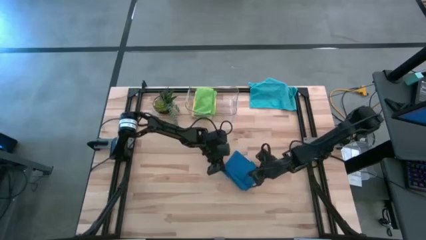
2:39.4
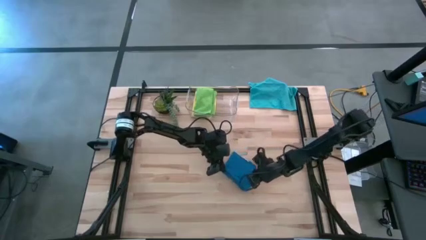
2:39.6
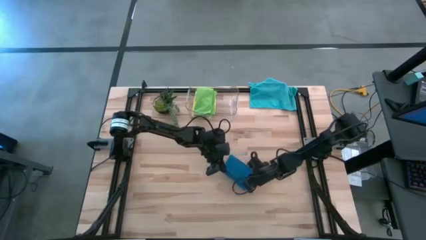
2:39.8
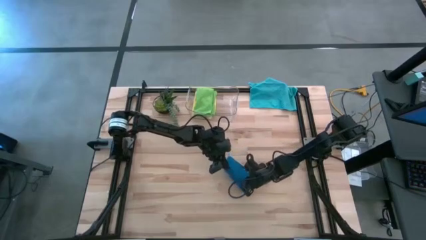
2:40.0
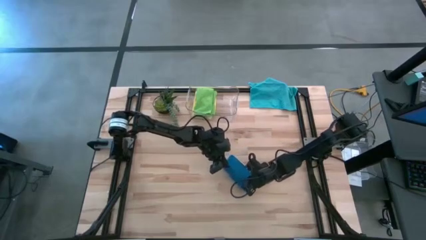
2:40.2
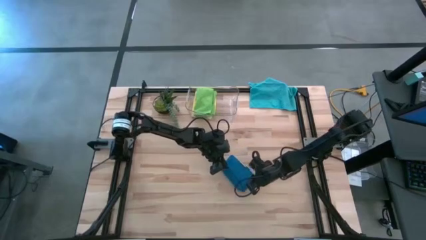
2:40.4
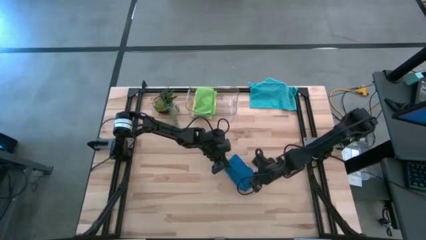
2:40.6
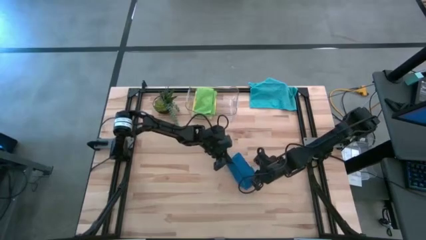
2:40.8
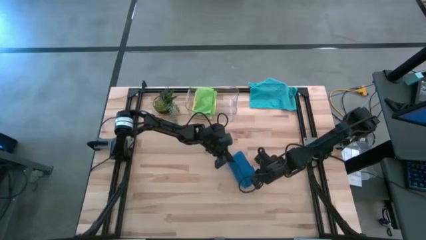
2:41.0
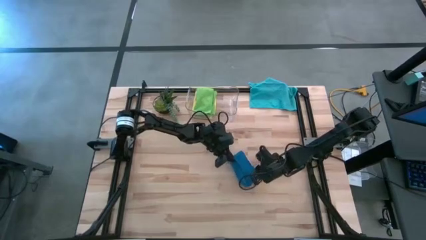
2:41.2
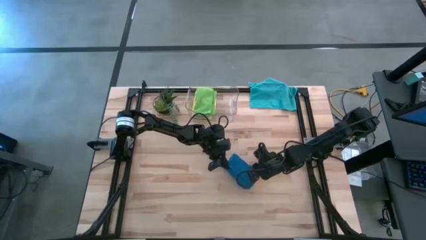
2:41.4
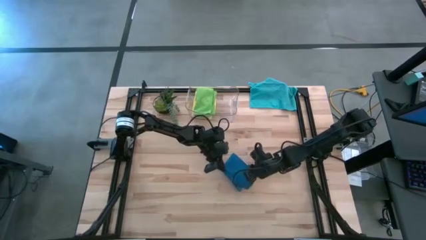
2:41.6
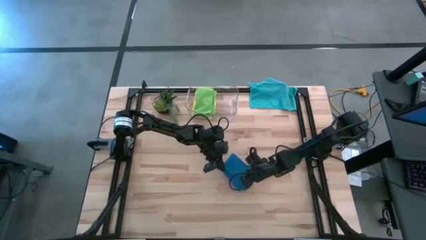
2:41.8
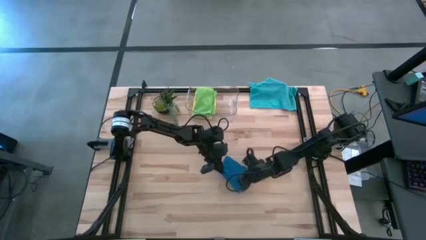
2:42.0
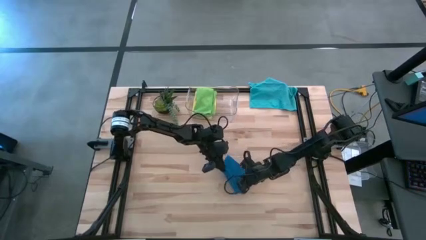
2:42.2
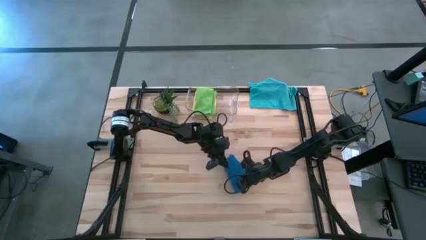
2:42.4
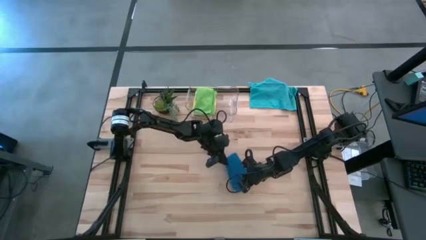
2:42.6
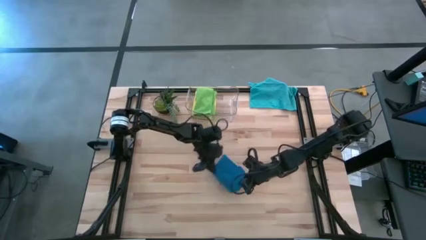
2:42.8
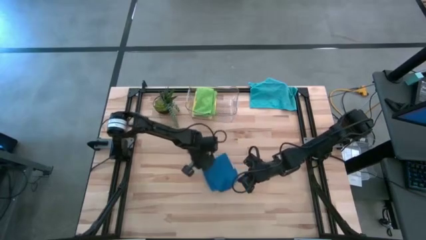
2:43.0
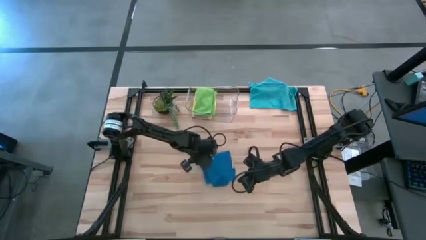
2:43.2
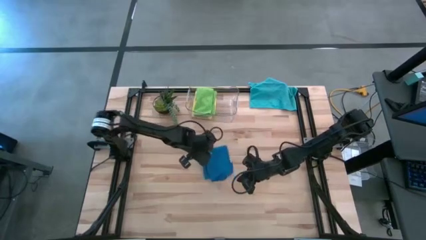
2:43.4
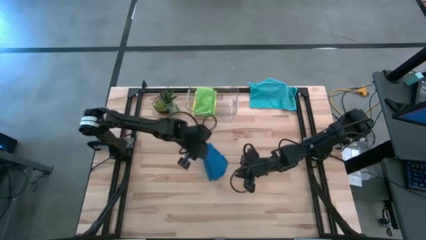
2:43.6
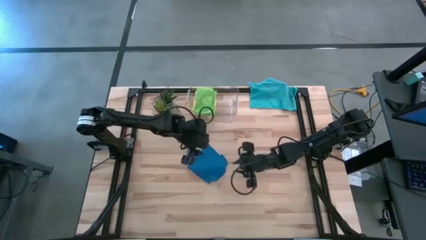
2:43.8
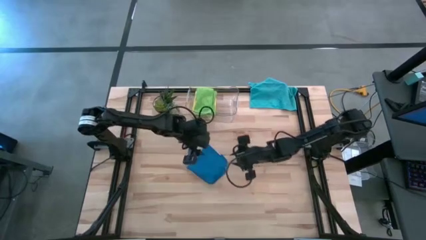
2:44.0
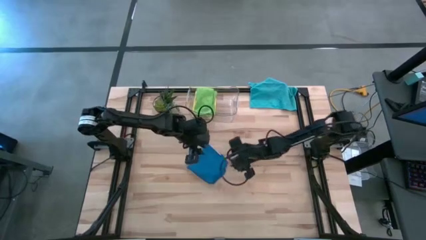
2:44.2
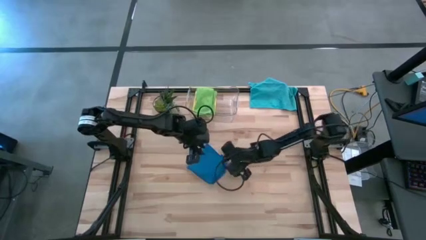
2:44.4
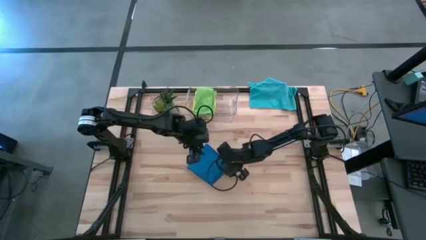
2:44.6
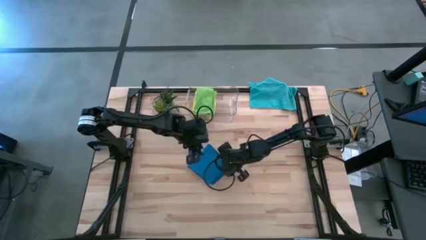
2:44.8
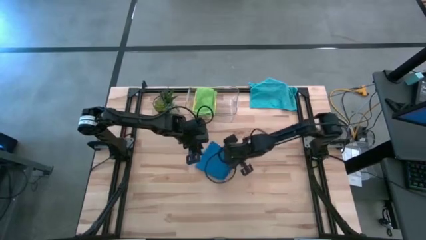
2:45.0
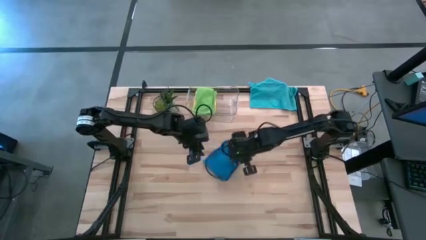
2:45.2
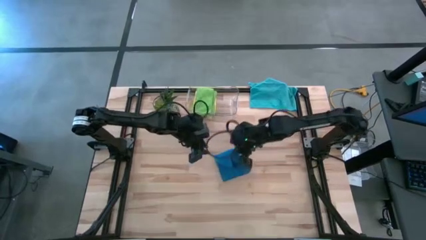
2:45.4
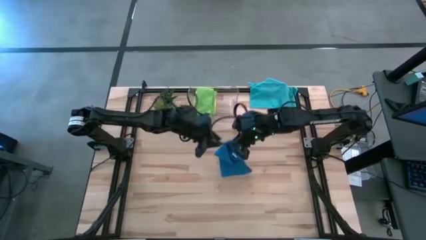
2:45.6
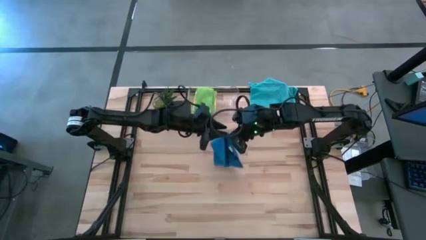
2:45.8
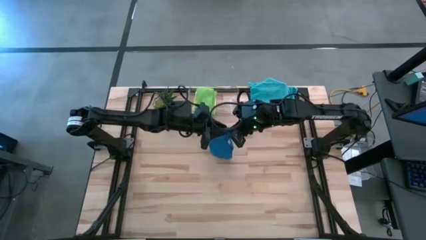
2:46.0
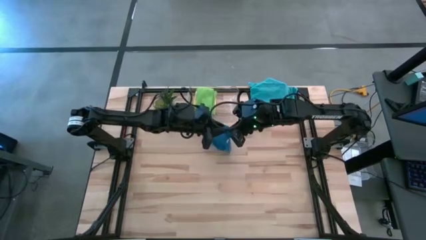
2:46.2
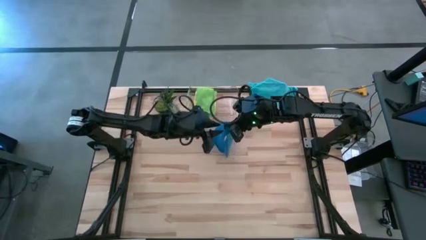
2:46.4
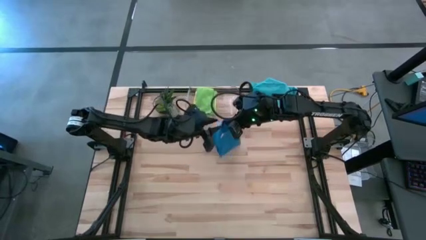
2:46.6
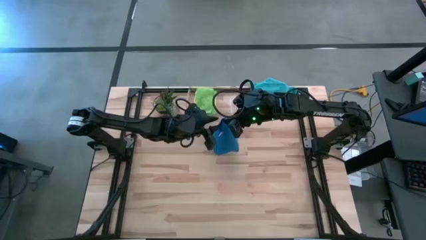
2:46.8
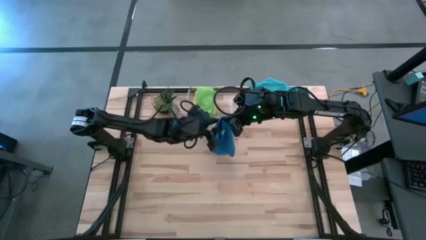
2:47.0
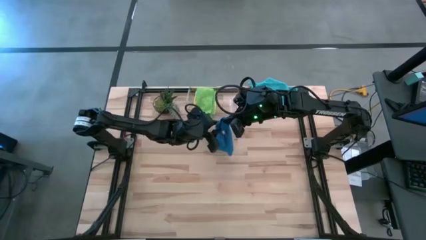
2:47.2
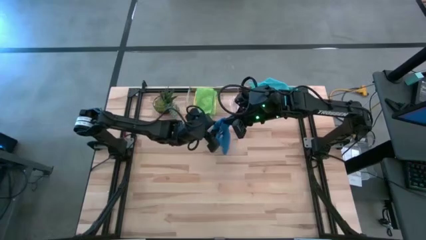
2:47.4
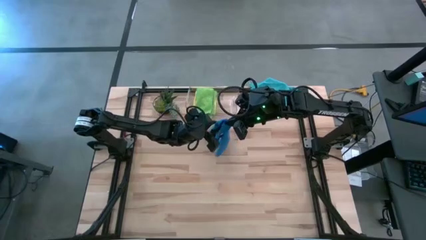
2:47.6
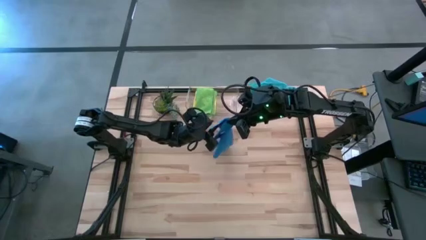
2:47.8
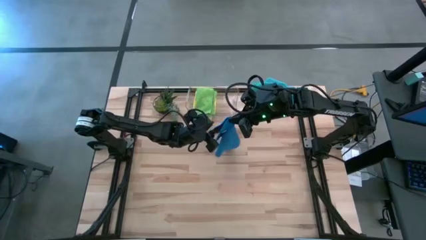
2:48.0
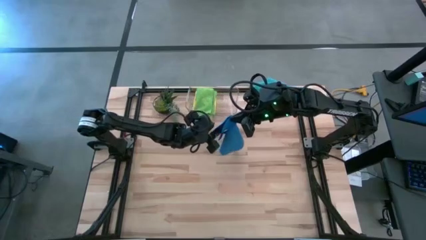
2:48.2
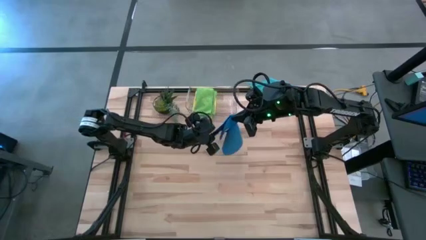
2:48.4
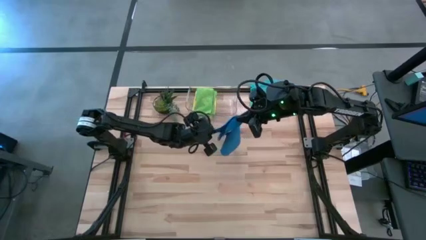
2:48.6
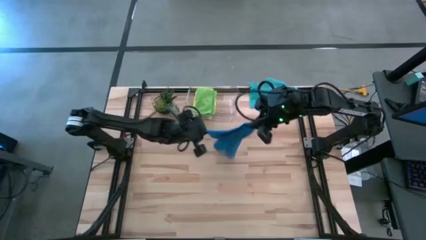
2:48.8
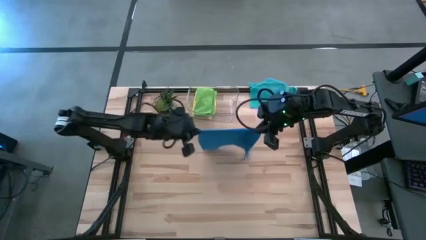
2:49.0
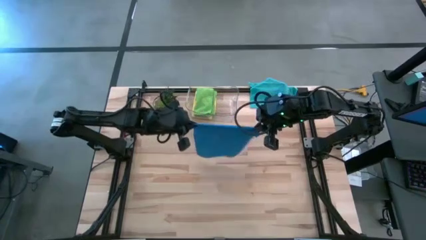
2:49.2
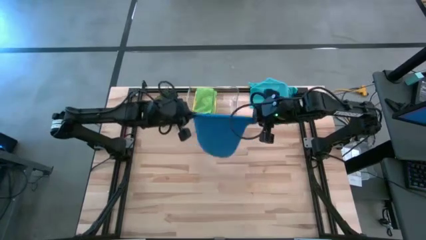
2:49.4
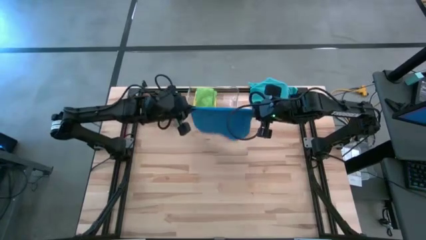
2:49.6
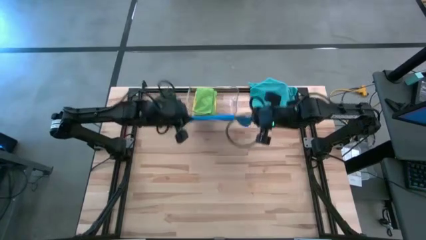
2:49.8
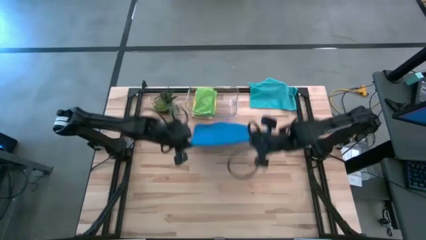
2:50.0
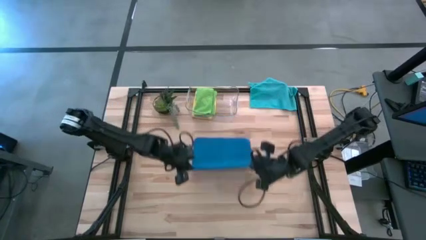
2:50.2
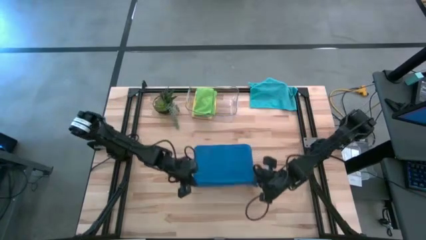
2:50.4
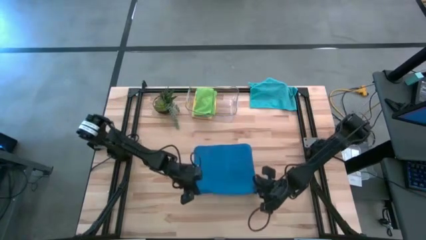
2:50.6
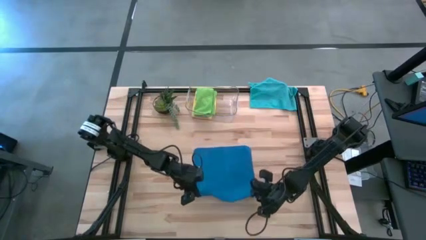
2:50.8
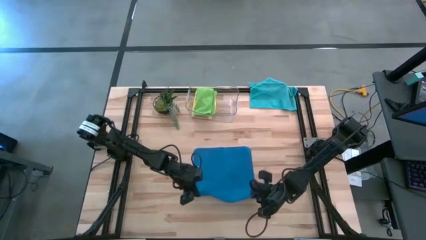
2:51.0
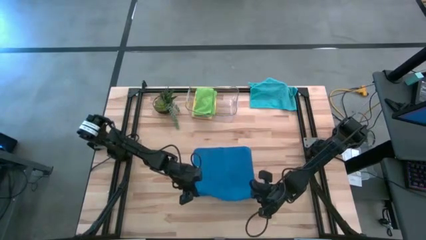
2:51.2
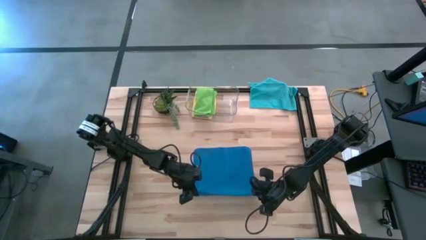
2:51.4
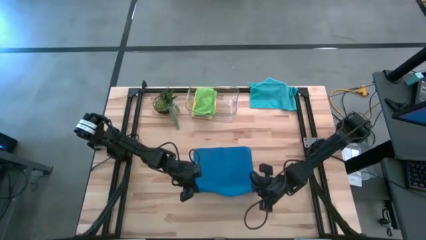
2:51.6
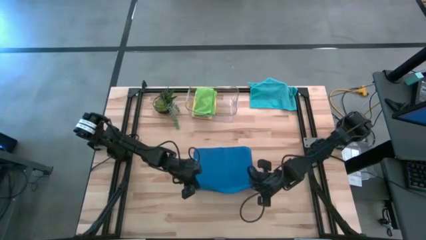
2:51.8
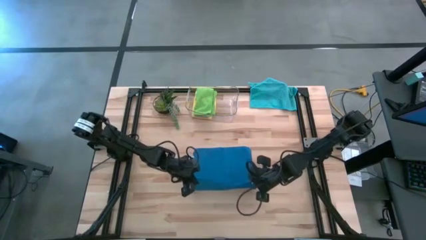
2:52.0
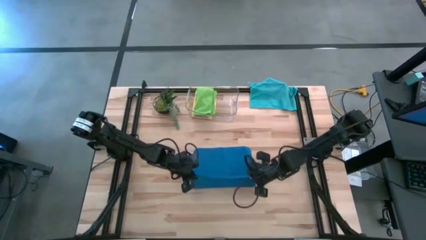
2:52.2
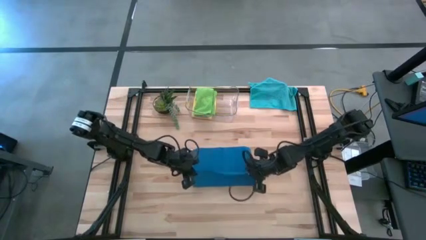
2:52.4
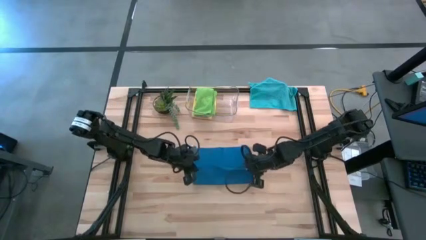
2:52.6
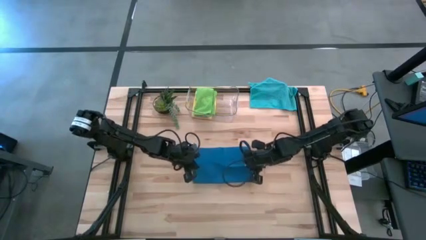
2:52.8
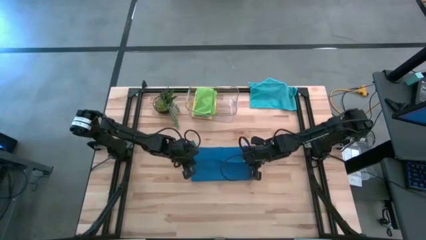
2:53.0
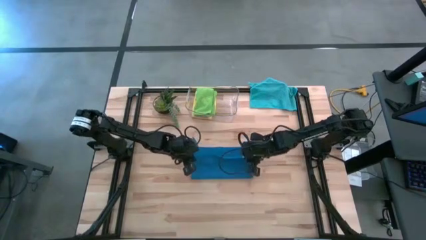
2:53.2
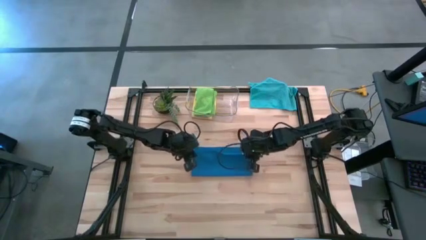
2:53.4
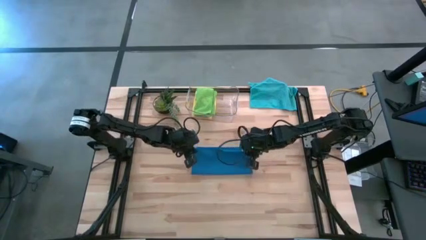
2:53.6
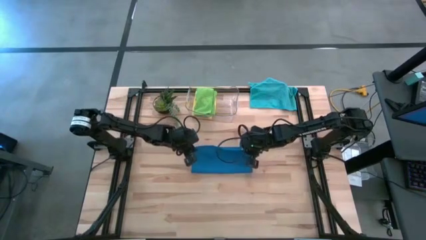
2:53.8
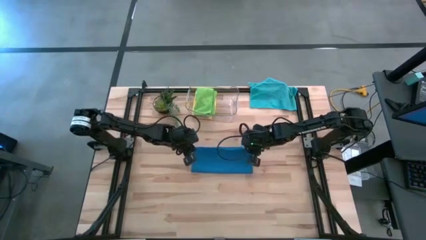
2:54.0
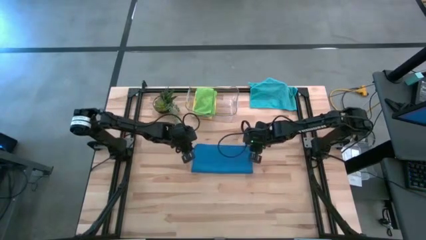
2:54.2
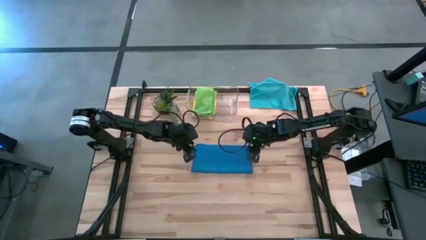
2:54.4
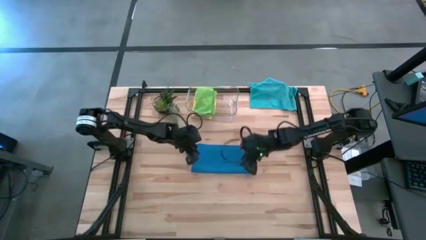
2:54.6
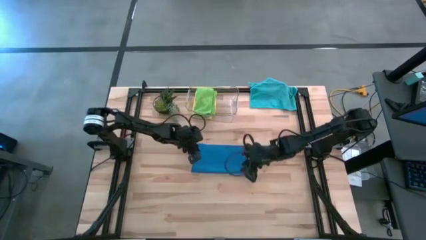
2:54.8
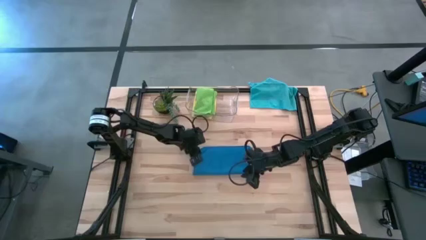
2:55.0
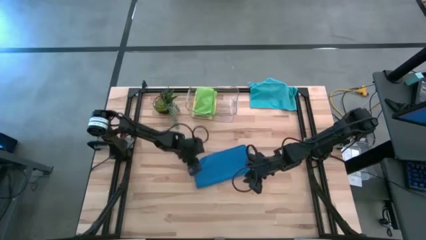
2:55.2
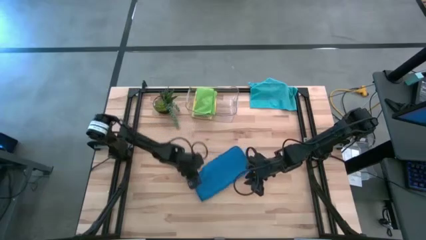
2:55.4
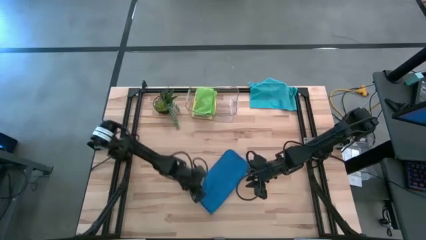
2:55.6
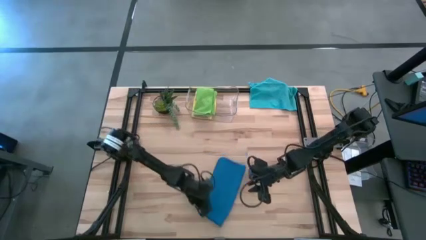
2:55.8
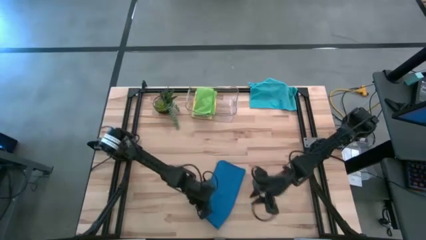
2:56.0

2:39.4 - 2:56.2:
Task: Fold microfiber towels
Fold the bottom blue towel
